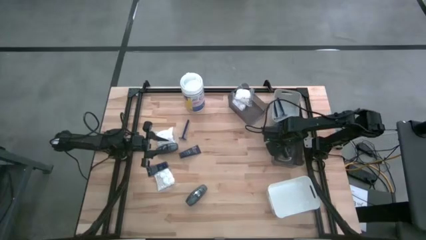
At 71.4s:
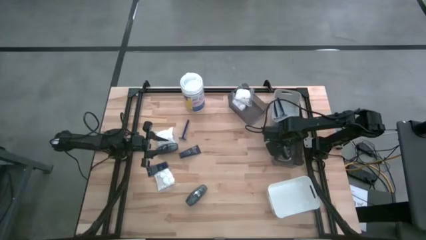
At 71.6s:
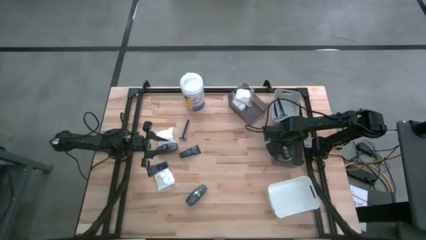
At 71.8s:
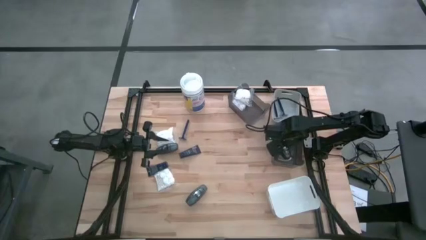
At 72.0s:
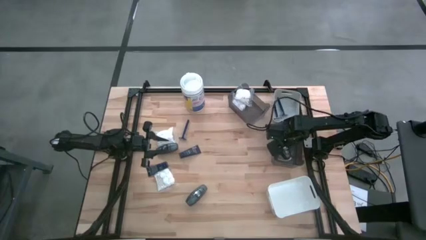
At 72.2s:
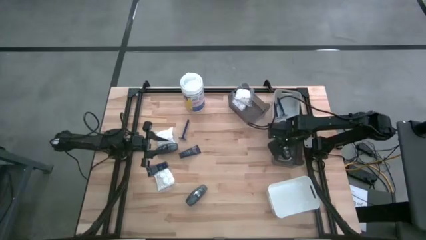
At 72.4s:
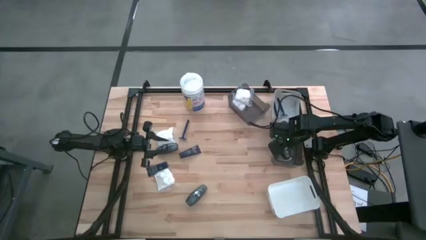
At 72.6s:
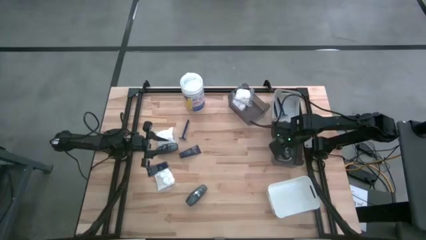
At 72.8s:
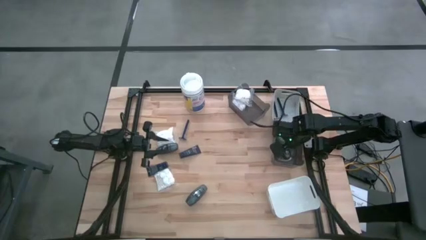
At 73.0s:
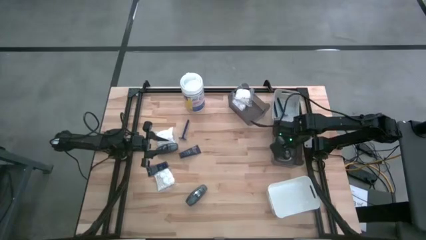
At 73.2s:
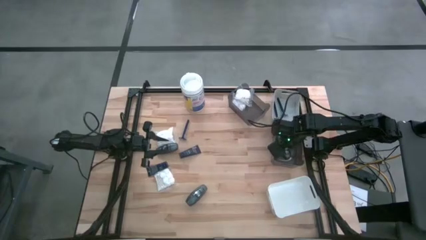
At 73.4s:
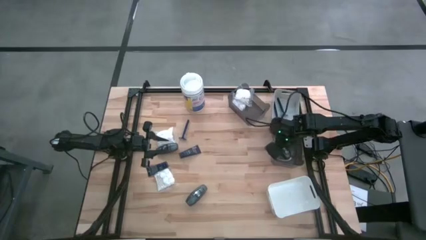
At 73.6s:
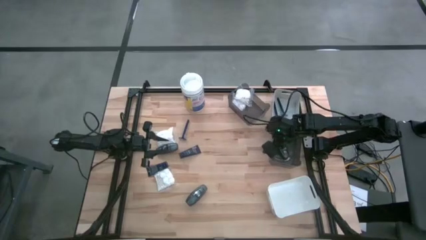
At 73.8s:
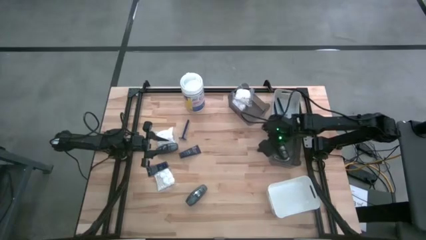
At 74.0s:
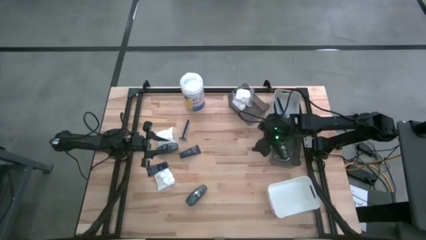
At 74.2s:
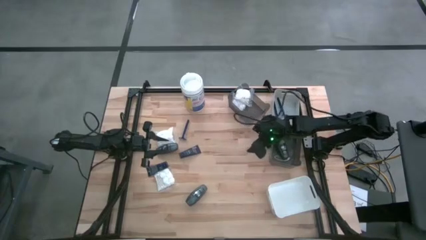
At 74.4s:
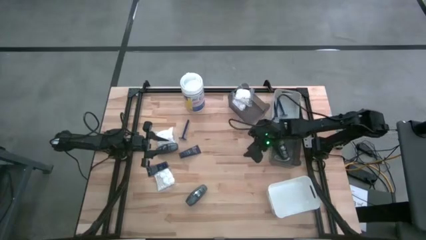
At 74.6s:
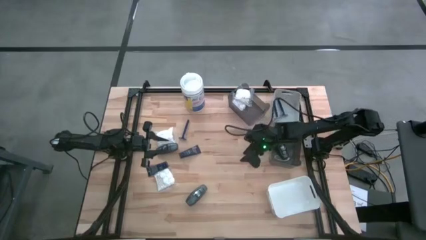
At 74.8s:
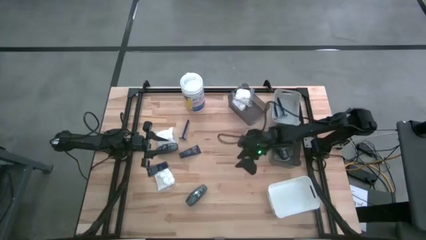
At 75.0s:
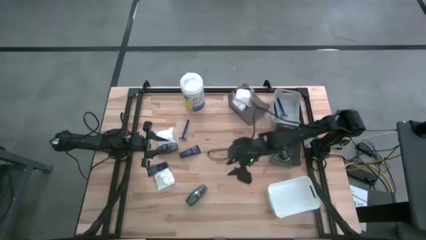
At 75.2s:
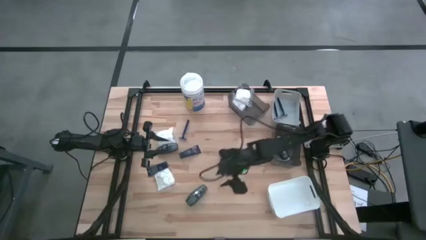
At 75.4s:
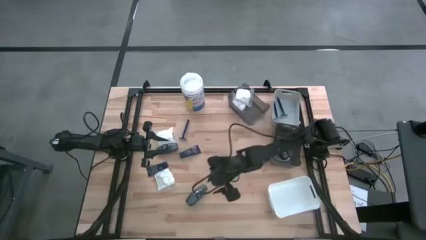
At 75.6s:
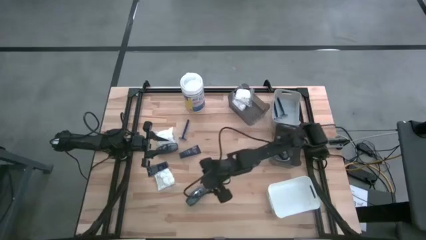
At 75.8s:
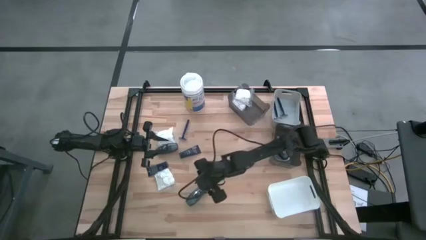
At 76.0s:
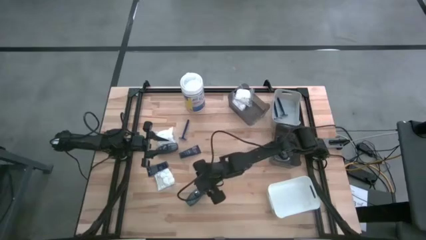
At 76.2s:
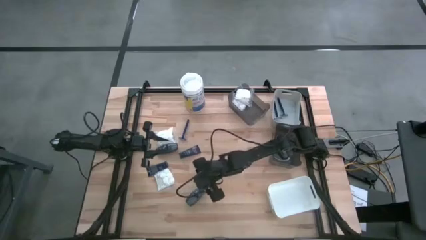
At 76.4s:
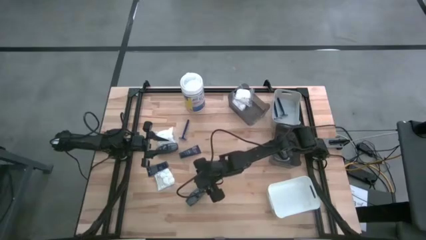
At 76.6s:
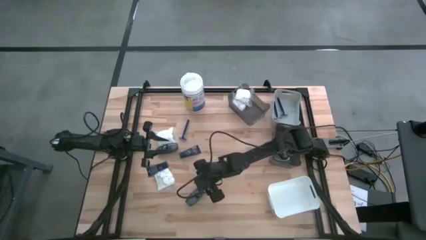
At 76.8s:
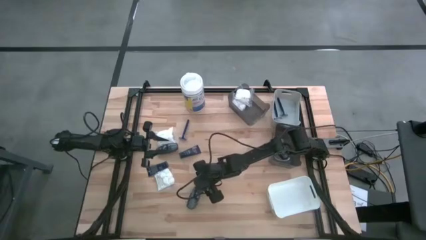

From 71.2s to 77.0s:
Task: Pick & Place Travel size toiletries
Put the bottom gray deodorant into the bottom black bin

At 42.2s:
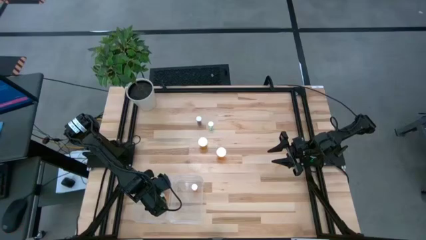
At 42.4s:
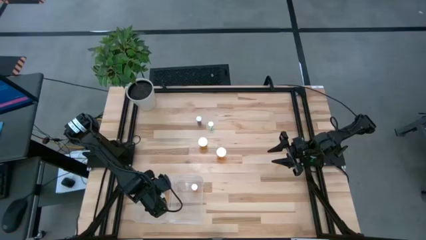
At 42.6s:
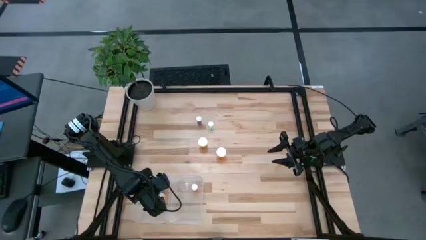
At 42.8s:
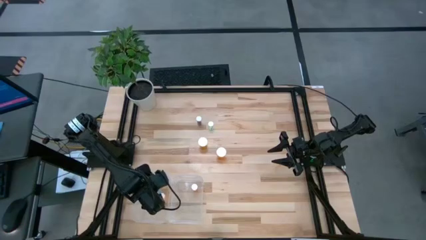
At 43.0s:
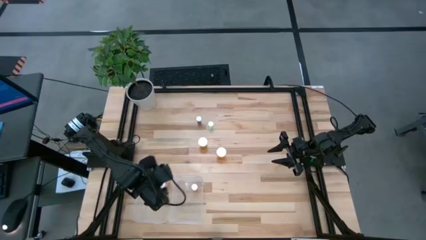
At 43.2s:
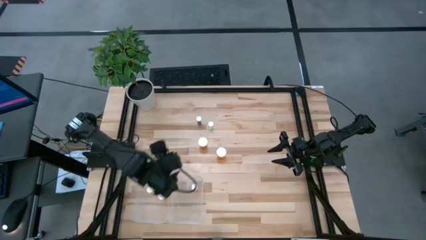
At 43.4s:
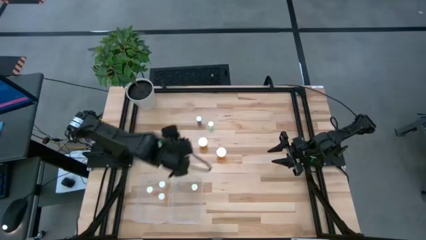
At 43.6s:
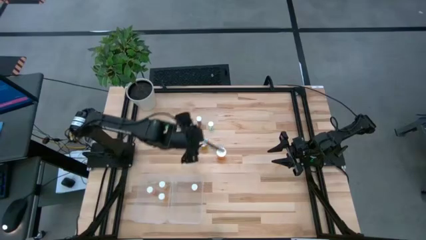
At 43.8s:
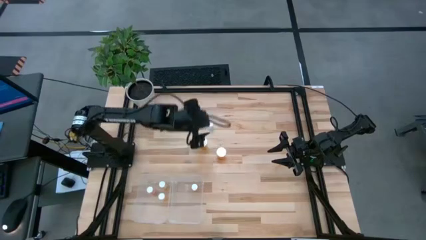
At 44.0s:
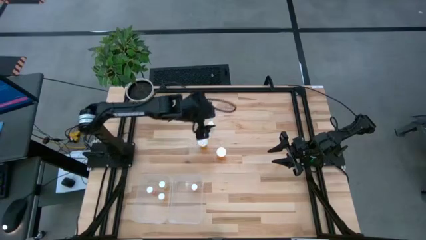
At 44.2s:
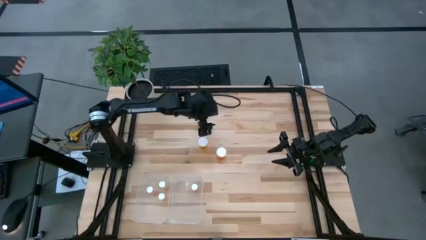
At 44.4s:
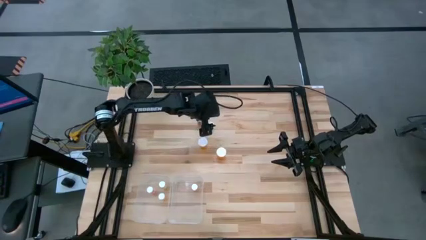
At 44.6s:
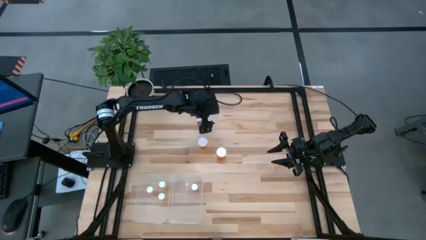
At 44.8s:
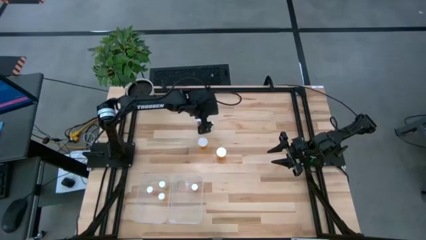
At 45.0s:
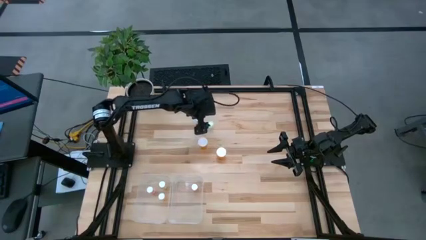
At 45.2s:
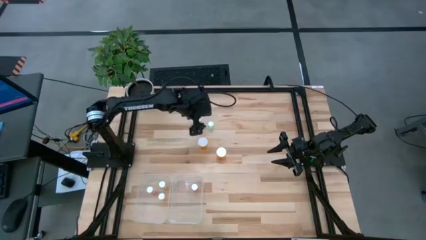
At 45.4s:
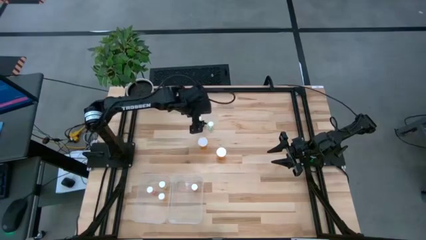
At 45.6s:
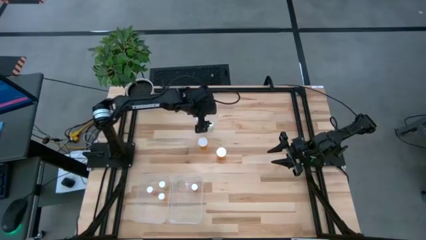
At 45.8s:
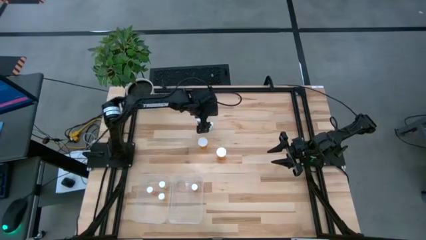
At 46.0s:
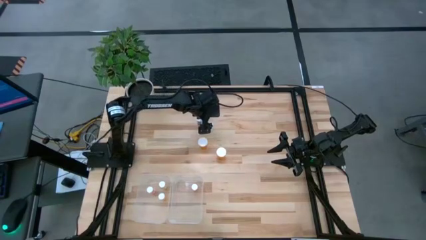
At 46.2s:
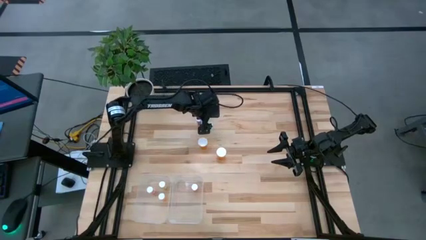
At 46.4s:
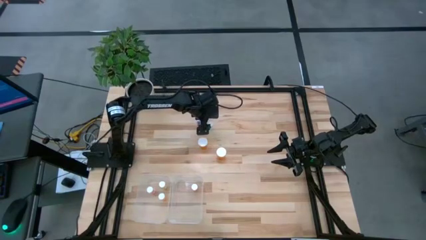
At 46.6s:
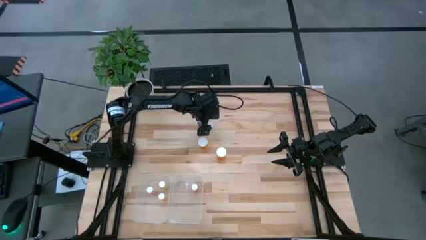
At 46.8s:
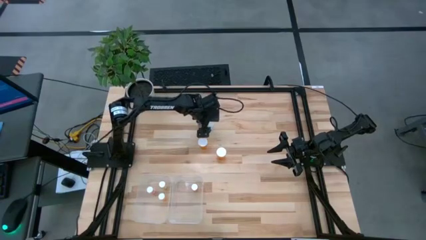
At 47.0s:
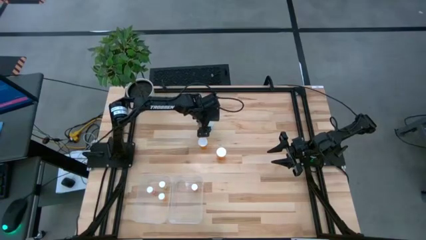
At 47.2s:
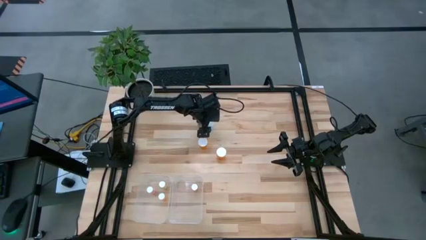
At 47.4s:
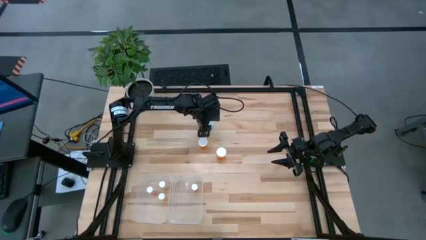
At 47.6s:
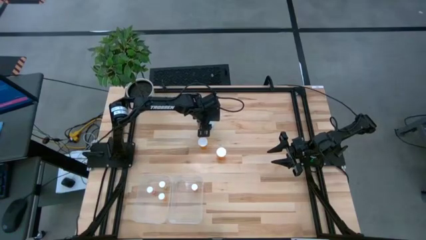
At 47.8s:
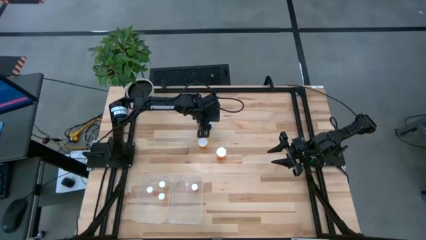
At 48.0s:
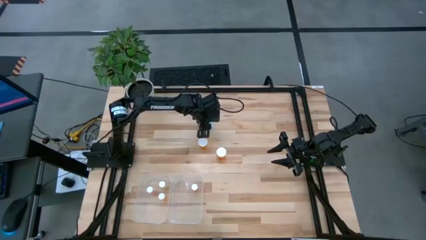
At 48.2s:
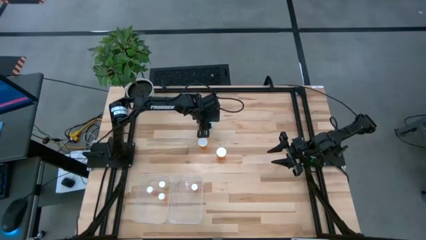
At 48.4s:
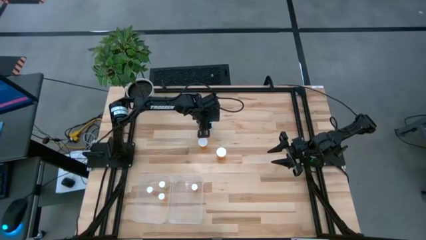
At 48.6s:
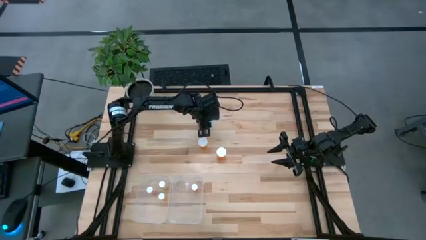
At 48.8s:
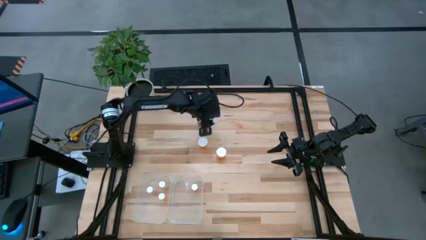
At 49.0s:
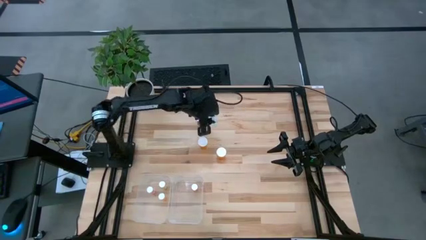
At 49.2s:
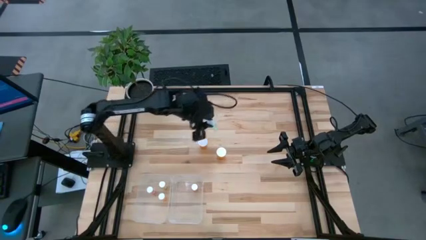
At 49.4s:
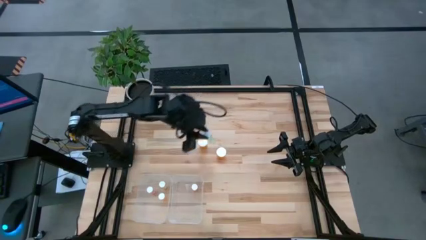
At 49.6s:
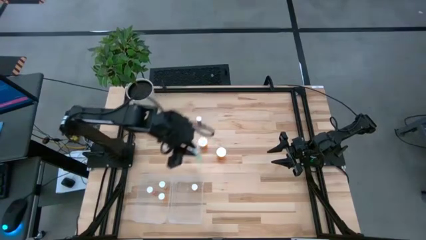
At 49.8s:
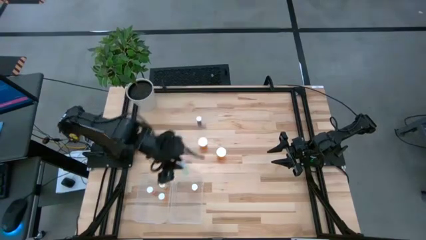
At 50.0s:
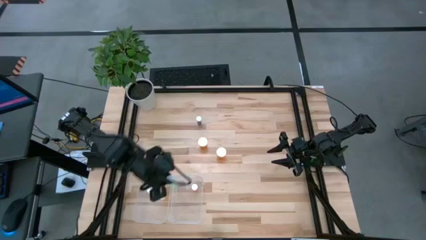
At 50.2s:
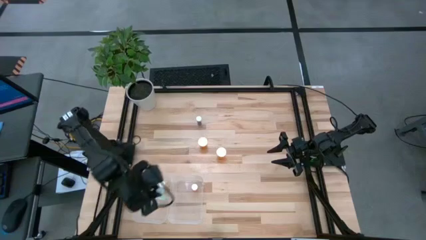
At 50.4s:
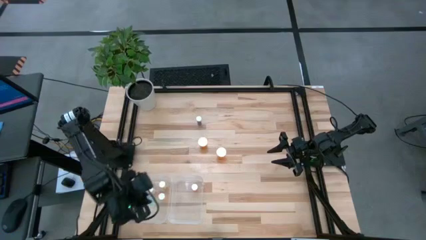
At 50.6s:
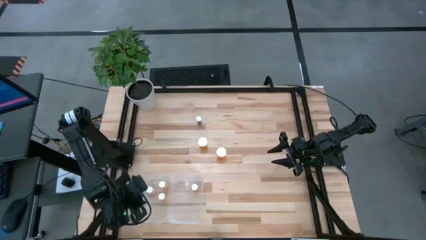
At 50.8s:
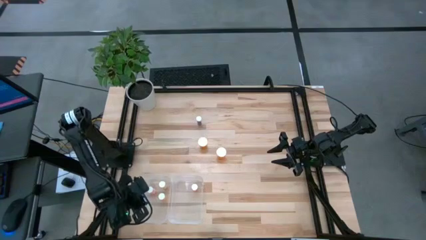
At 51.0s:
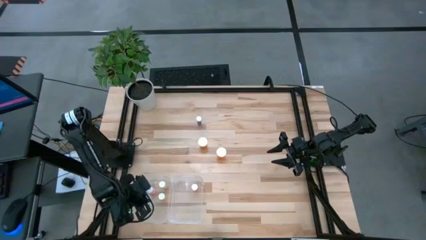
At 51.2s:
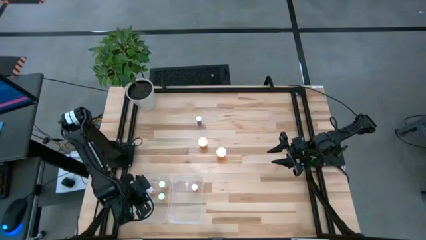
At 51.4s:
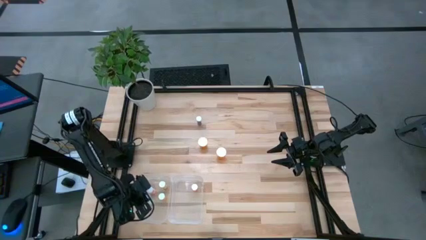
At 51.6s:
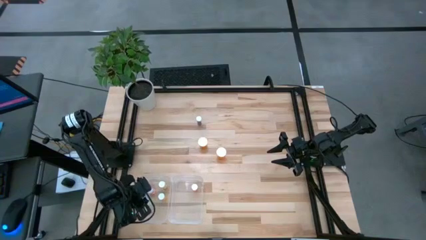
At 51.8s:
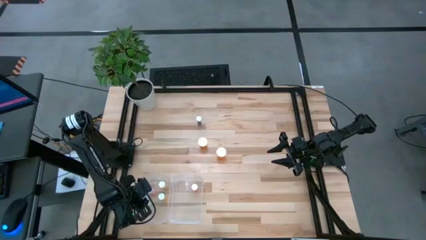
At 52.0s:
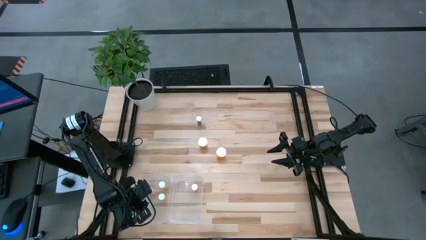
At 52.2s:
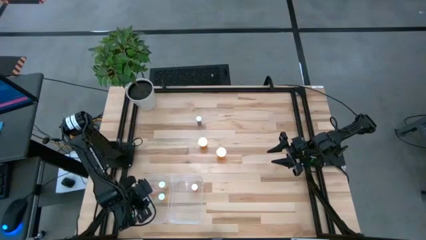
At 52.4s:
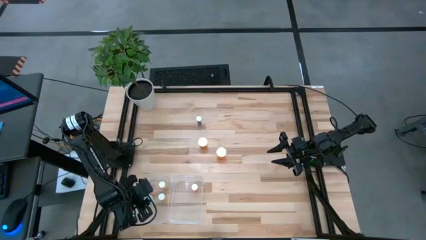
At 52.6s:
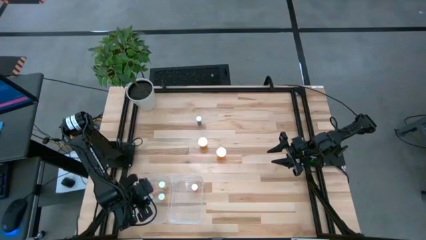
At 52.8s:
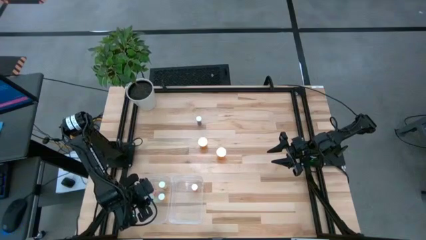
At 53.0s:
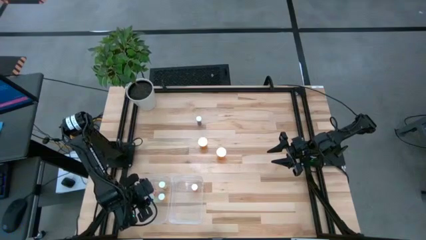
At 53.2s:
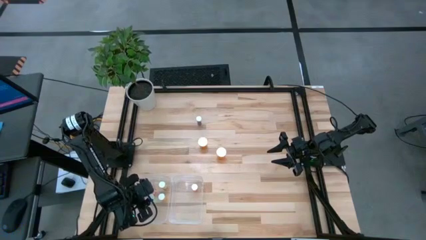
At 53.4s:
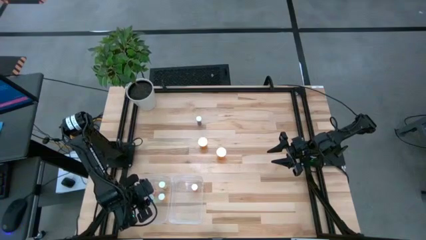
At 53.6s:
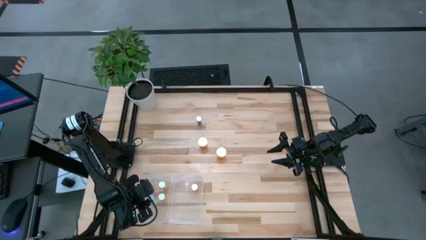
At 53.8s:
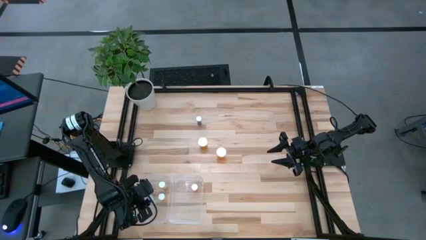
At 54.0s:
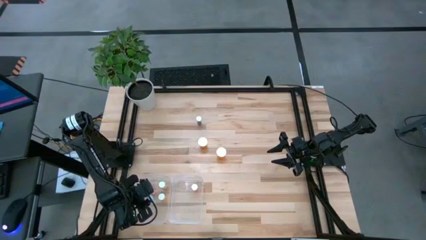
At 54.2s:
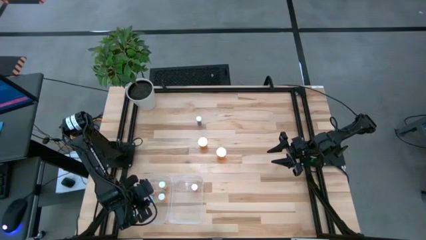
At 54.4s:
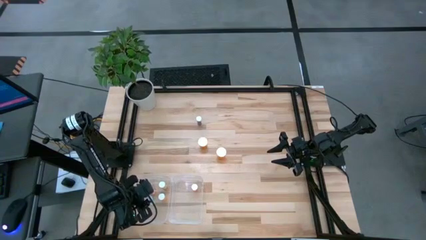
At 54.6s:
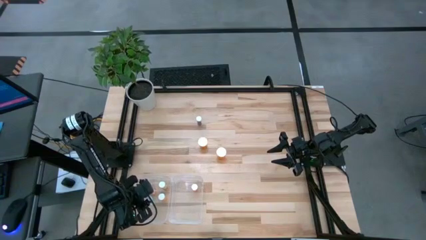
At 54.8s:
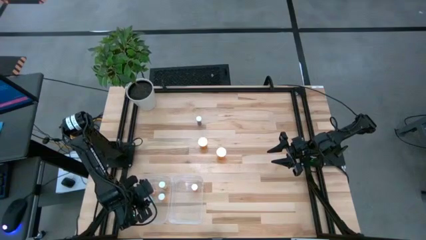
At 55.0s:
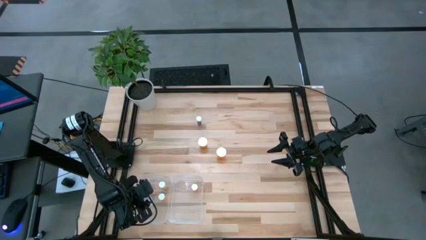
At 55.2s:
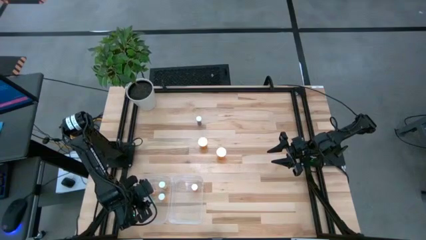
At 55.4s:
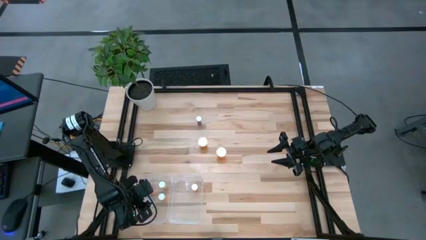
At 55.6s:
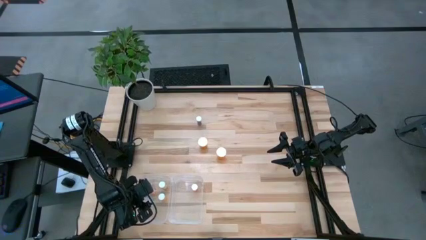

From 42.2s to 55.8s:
Task: Pick and place medicine bottles into bin by pill shape (circle, oval)
Put the small green tablet bottle into the left transparent bin
